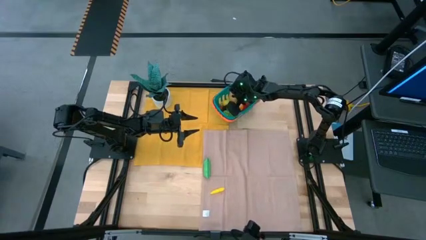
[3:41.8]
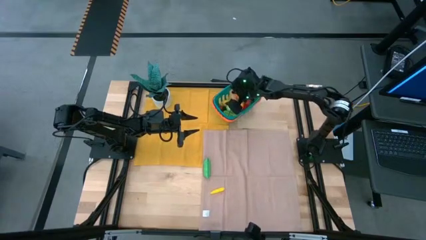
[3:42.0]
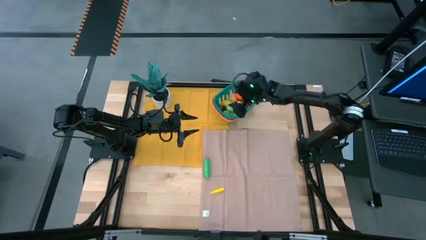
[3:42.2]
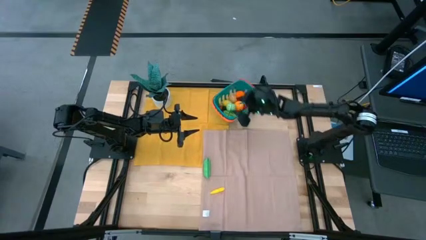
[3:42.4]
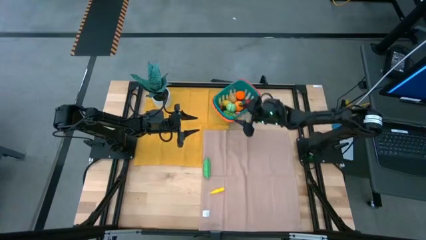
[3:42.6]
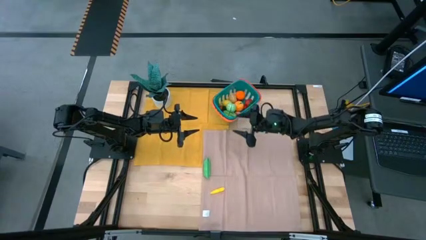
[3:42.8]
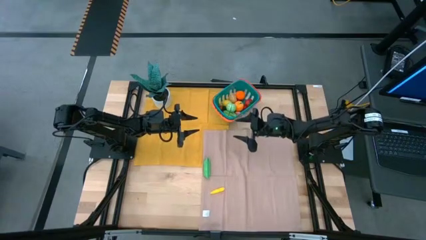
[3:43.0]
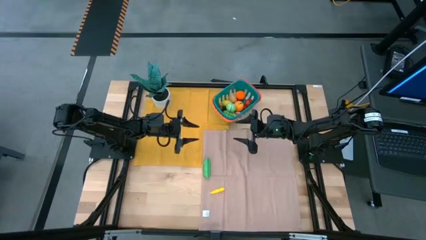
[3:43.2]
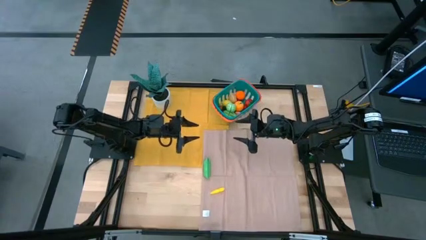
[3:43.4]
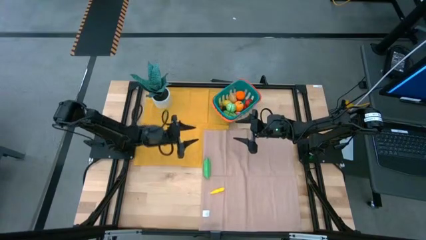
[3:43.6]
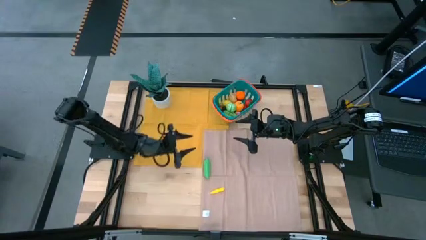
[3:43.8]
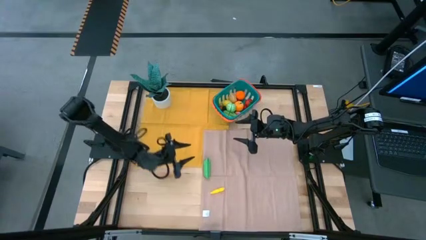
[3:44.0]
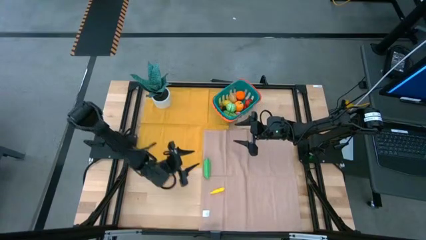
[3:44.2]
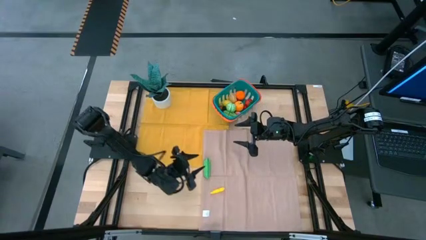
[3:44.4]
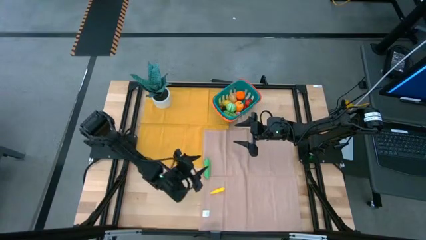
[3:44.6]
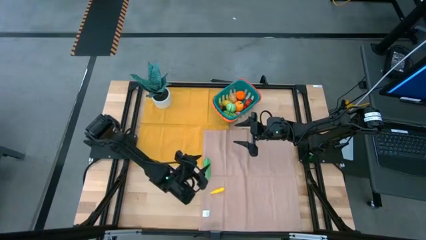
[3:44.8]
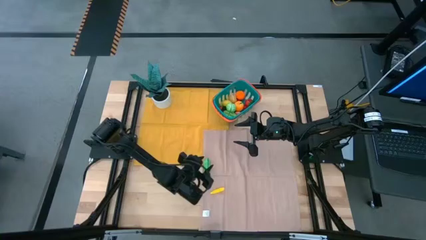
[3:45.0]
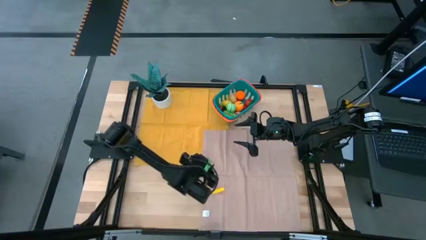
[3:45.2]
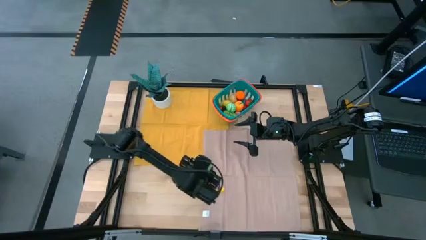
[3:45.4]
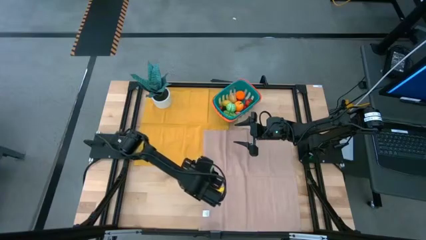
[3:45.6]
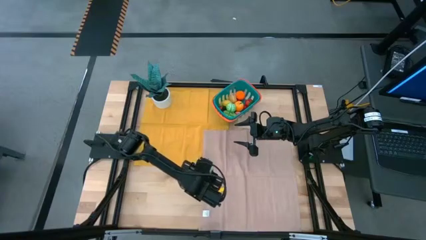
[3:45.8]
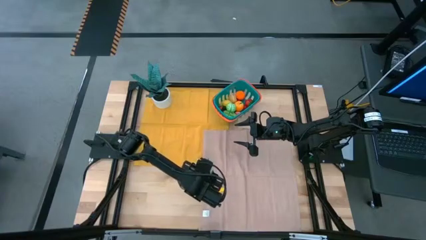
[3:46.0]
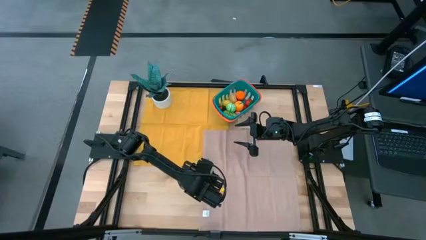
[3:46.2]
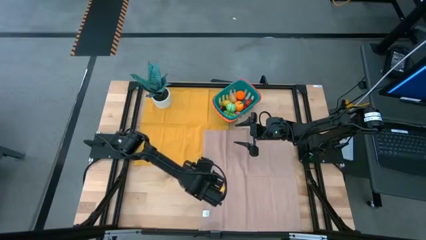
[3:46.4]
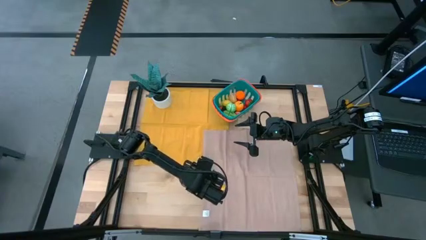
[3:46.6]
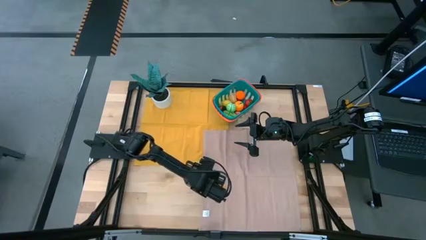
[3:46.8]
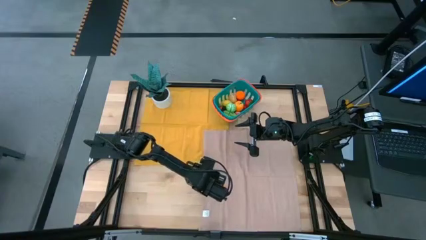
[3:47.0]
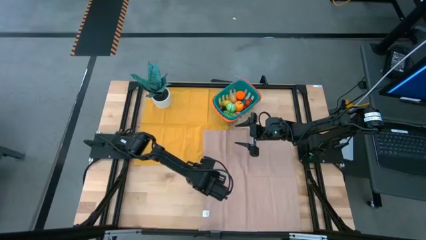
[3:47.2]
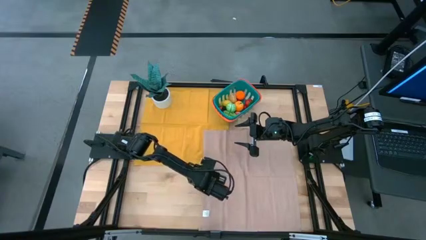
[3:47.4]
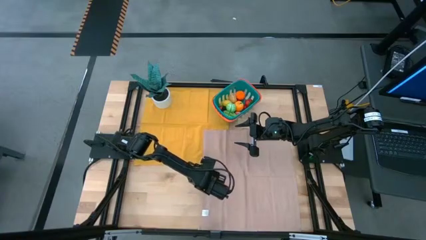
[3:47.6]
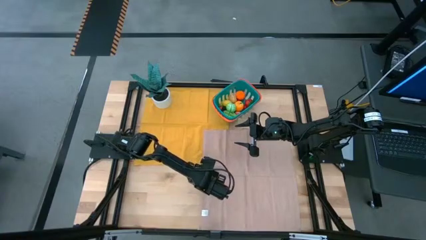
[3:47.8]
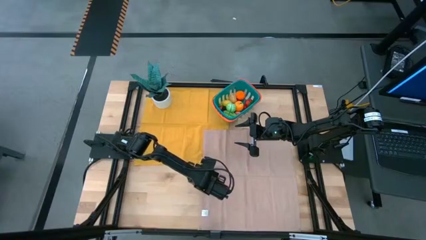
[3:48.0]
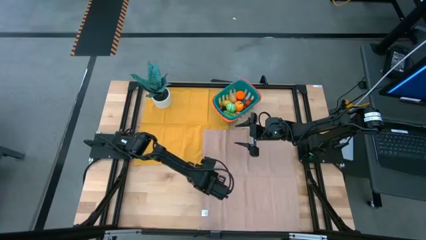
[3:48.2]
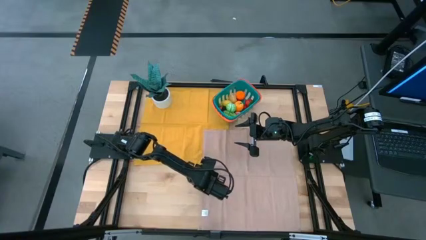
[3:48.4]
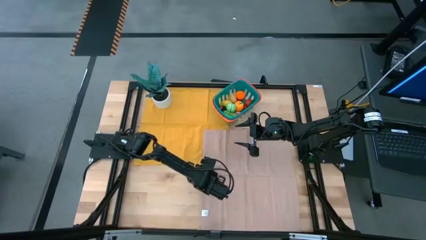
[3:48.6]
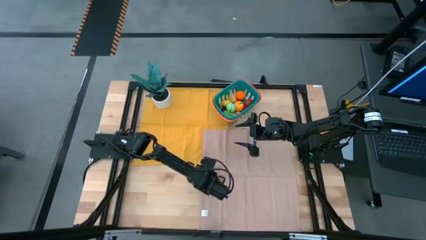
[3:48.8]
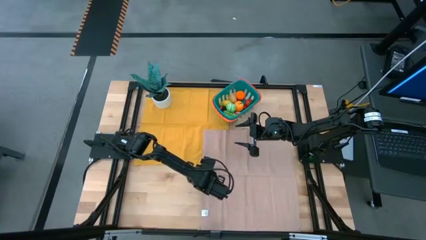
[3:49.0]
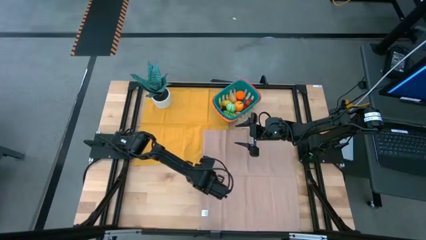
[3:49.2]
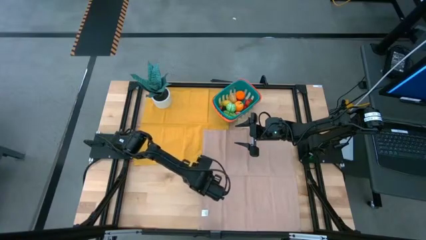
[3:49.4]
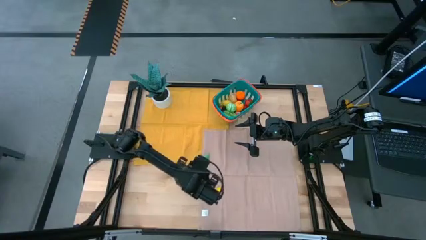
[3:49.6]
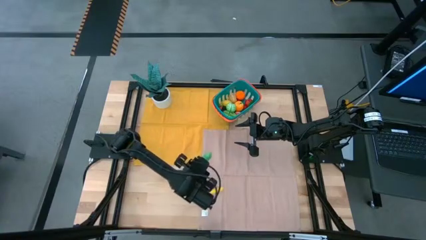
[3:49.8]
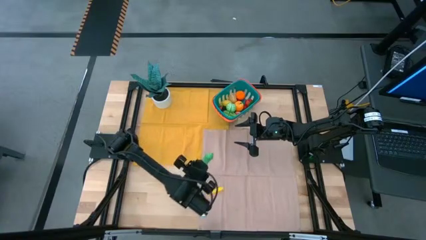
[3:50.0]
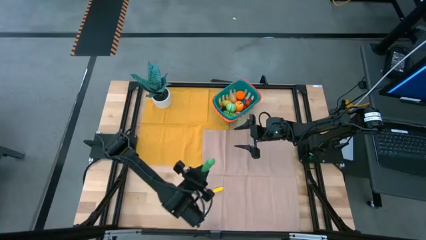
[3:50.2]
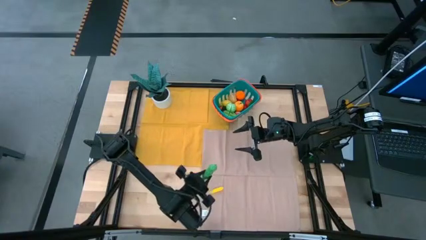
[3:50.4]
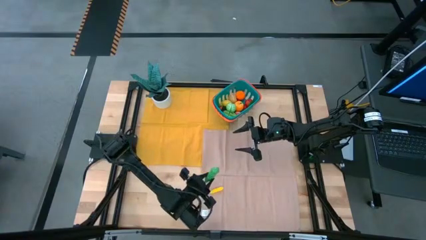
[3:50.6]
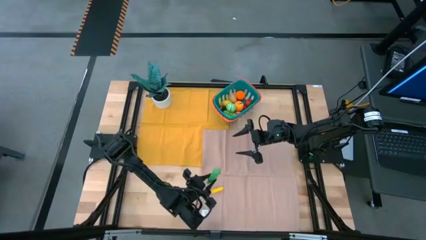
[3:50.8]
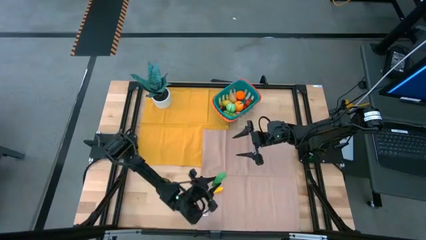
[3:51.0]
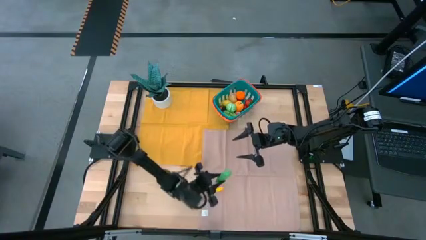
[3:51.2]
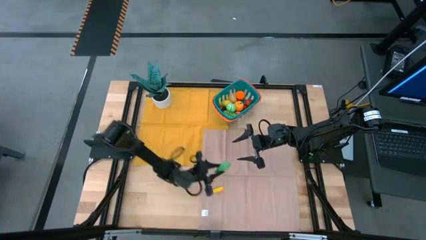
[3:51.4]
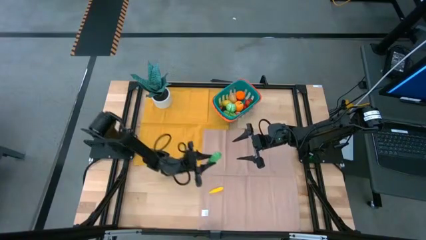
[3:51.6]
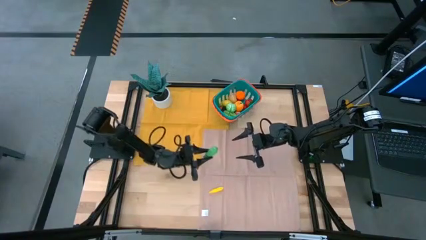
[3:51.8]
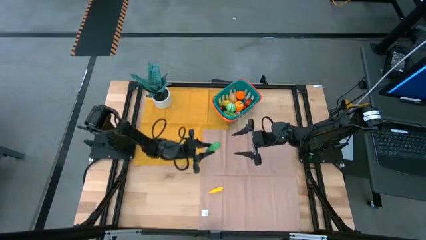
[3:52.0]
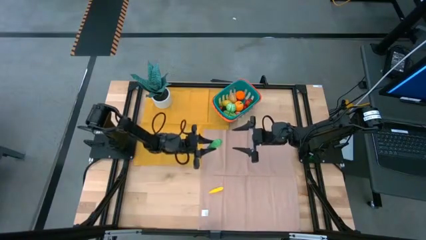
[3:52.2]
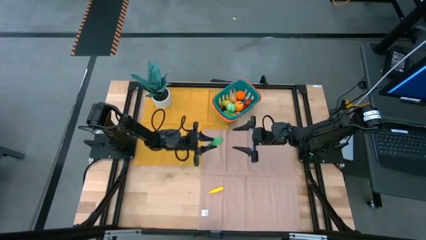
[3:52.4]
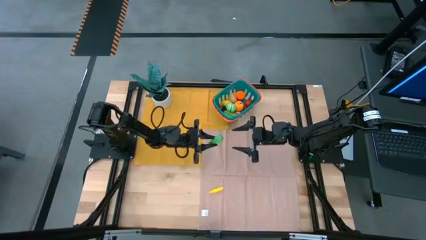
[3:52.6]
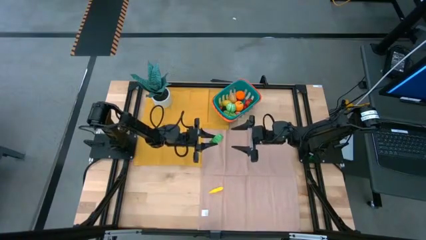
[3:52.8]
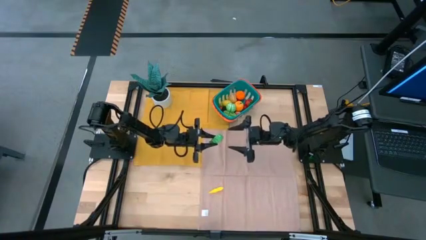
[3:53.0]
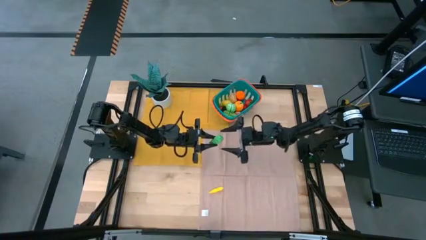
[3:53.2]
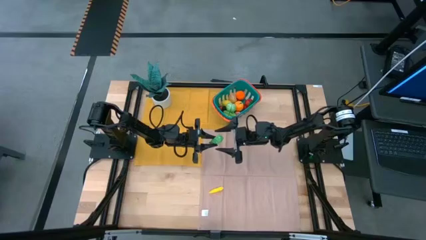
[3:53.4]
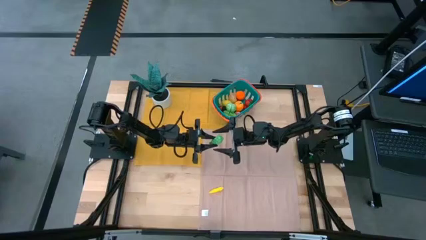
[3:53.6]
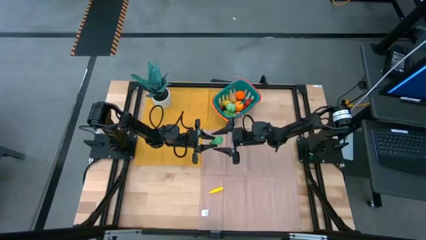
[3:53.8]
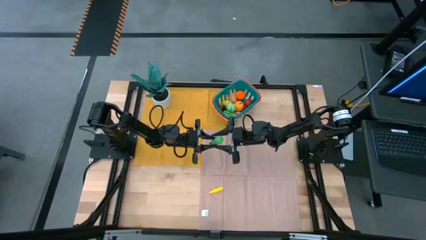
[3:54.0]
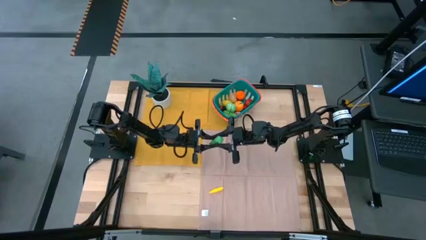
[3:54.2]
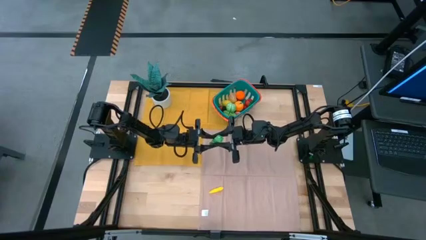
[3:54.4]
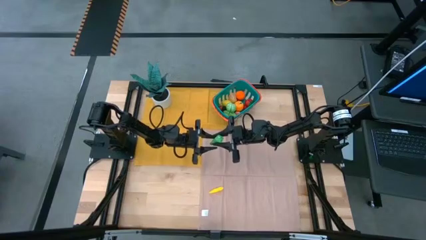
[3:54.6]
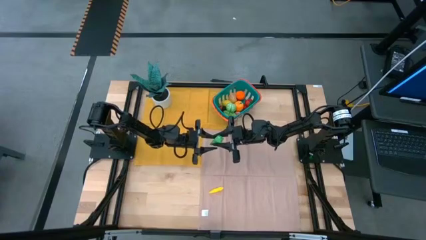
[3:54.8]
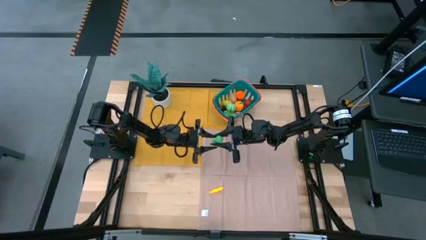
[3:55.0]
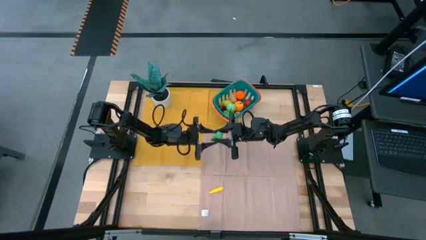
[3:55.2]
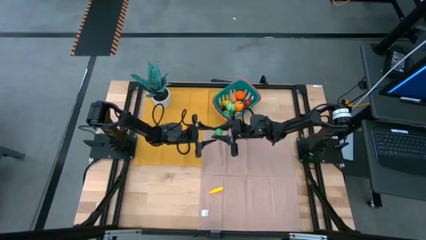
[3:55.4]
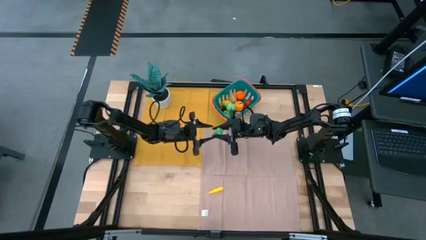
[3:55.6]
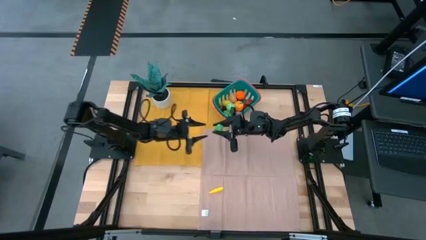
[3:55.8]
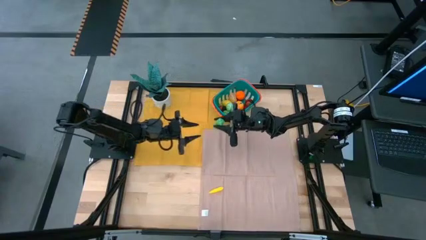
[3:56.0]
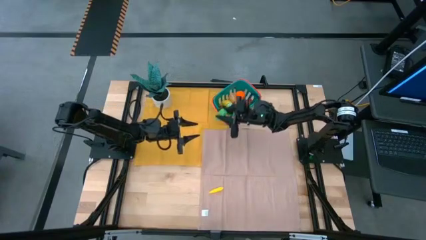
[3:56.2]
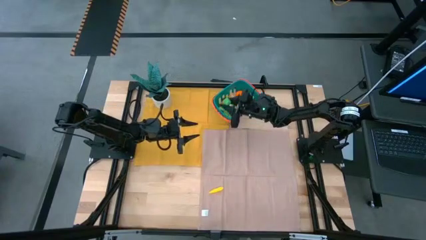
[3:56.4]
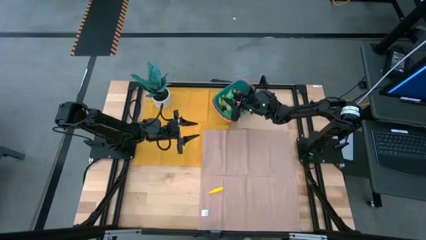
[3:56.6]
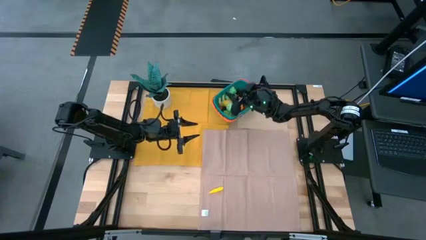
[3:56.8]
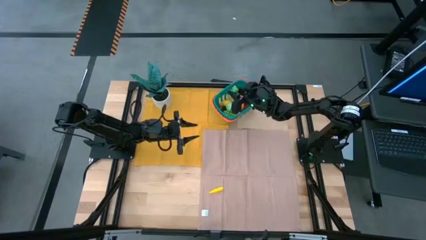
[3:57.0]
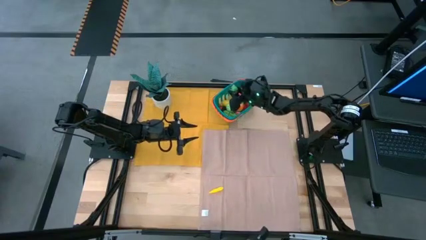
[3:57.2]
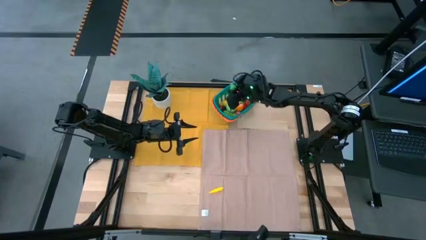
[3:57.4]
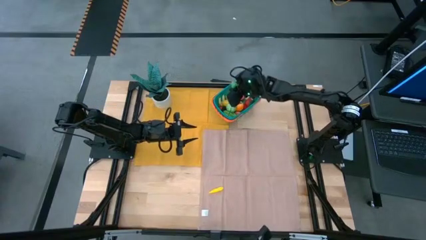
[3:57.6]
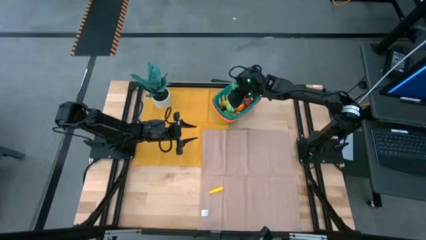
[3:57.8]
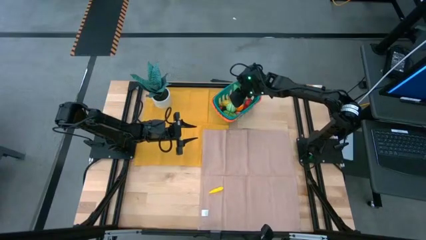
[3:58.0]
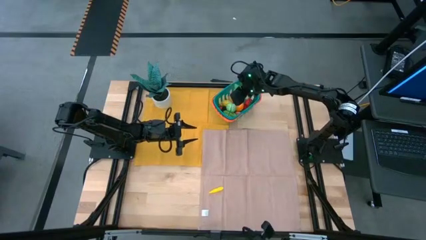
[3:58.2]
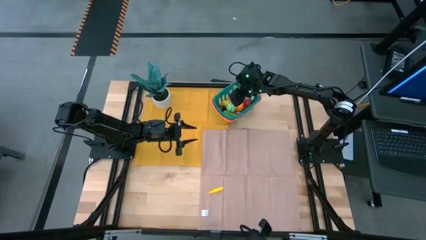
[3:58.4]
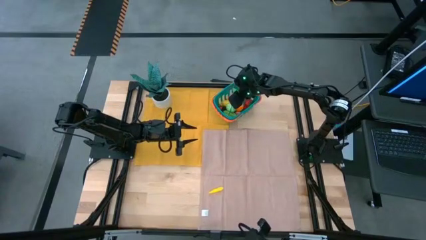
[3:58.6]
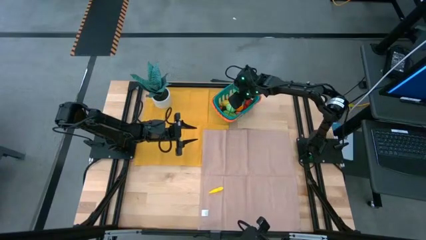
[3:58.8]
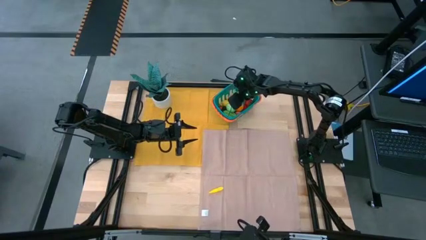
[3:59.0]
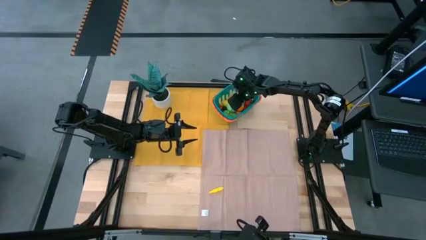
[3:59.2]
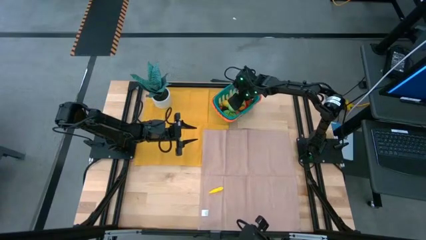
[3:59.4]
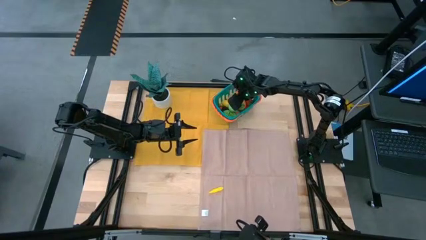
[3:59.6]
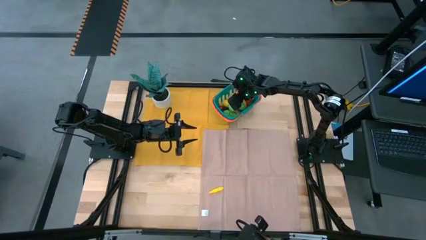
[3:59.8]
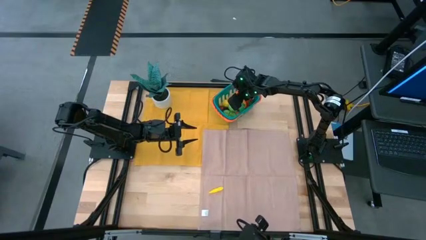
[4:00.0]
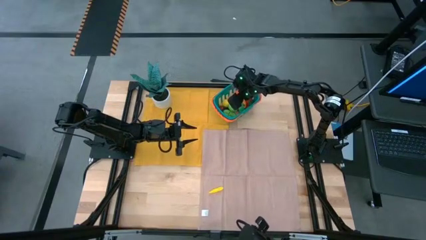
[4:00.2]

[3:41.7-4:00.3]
Task: Pick and placing Produce into tupperware
Put the green peas into the basket
